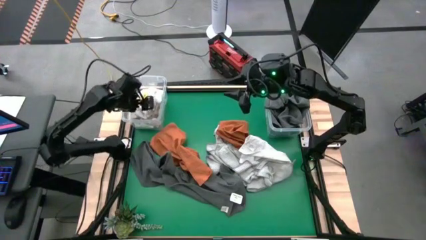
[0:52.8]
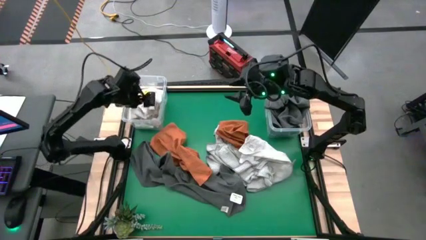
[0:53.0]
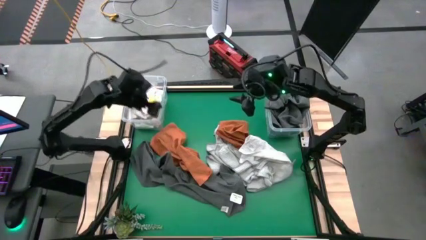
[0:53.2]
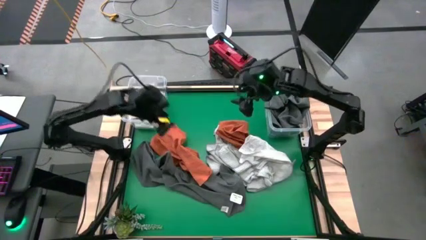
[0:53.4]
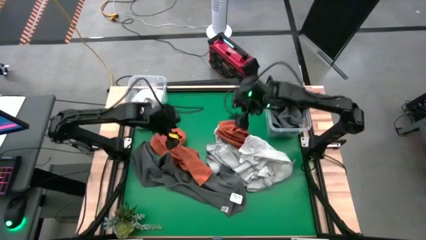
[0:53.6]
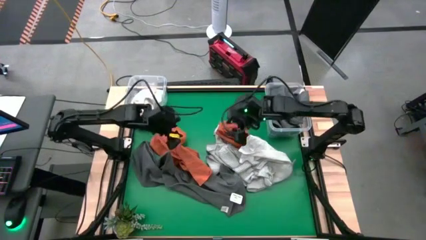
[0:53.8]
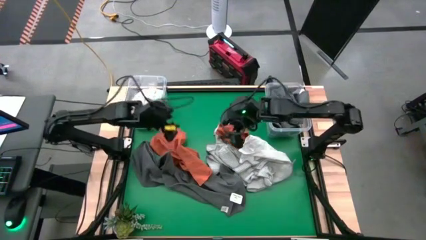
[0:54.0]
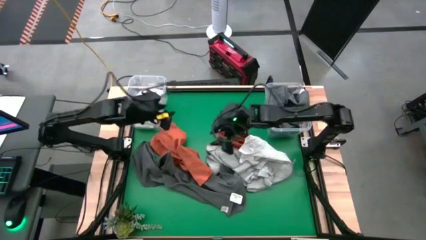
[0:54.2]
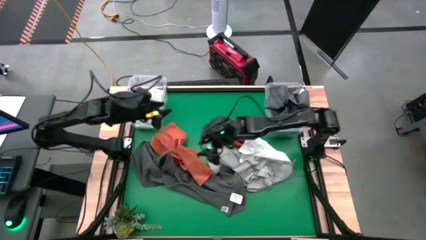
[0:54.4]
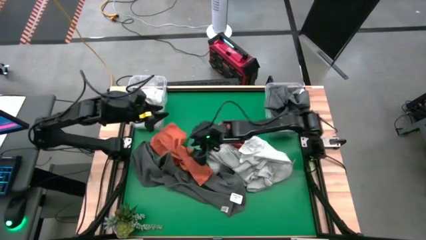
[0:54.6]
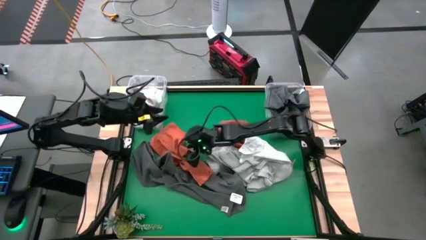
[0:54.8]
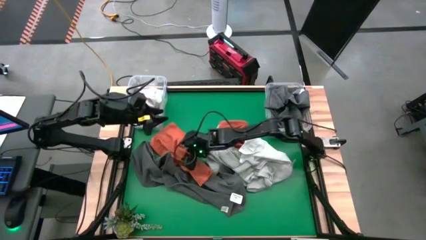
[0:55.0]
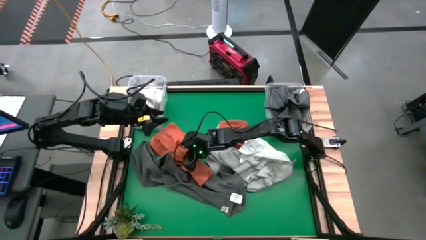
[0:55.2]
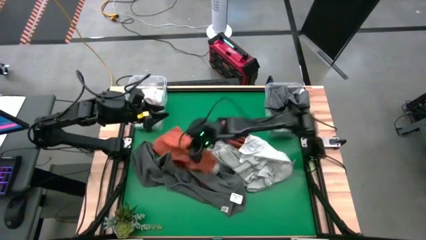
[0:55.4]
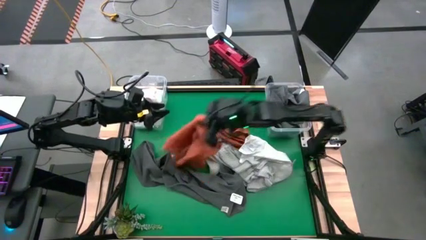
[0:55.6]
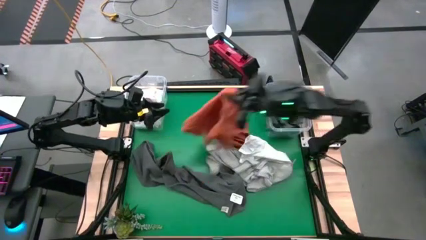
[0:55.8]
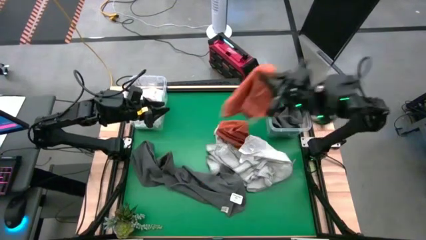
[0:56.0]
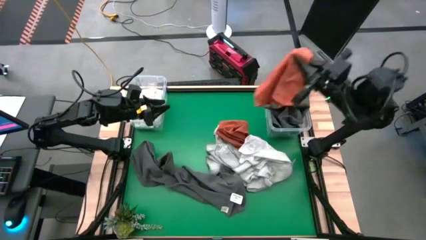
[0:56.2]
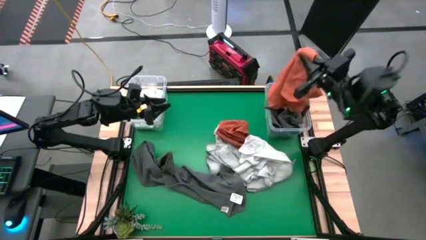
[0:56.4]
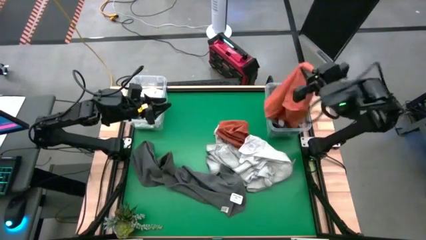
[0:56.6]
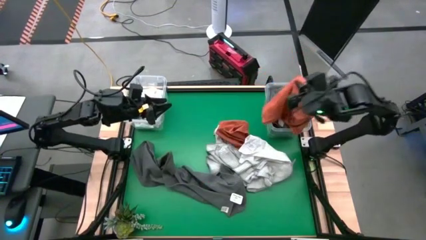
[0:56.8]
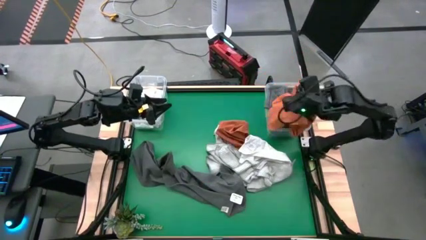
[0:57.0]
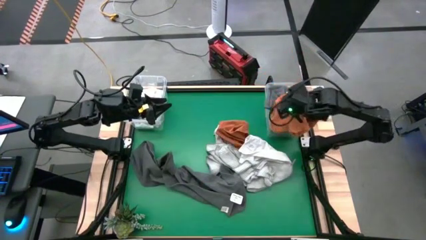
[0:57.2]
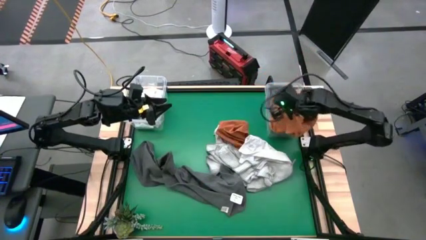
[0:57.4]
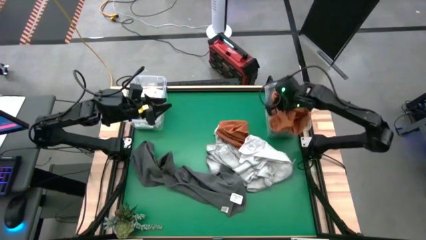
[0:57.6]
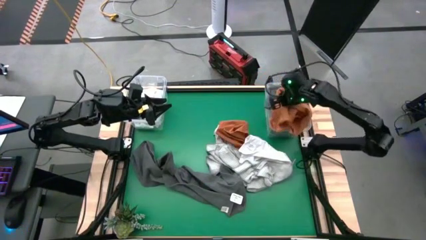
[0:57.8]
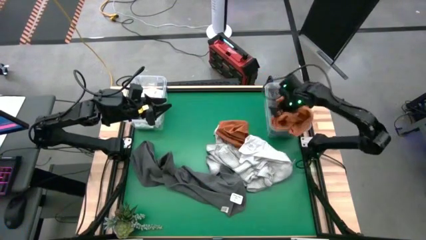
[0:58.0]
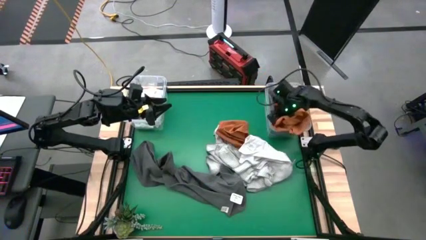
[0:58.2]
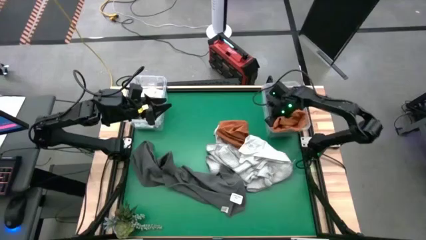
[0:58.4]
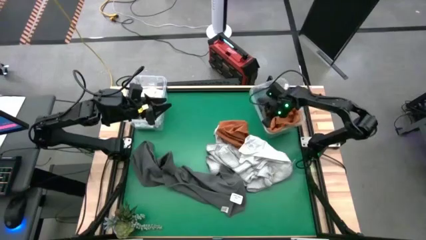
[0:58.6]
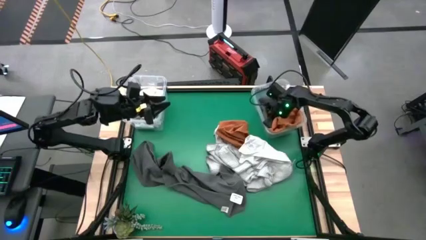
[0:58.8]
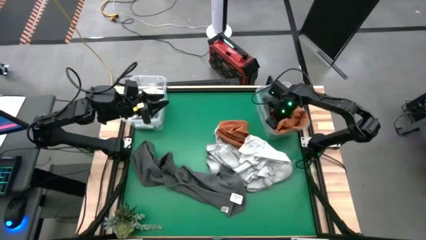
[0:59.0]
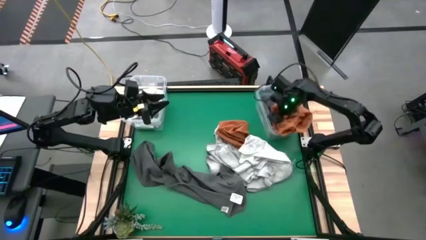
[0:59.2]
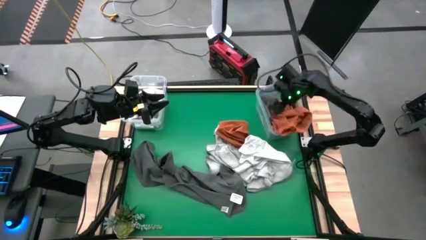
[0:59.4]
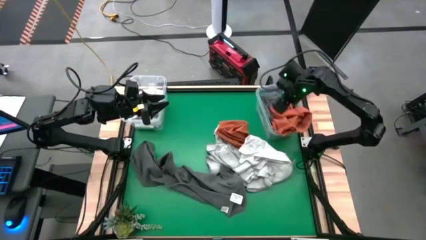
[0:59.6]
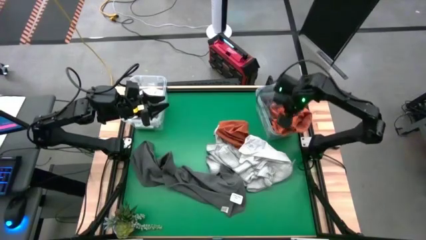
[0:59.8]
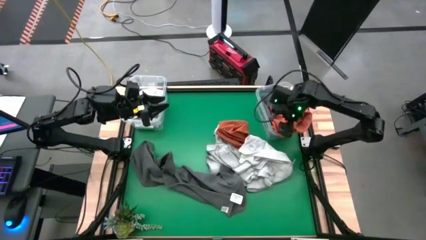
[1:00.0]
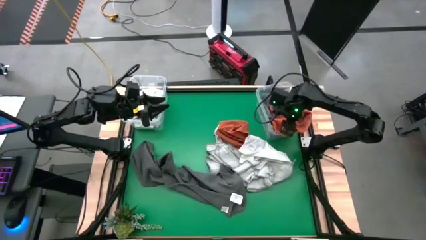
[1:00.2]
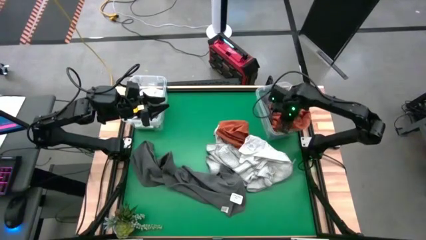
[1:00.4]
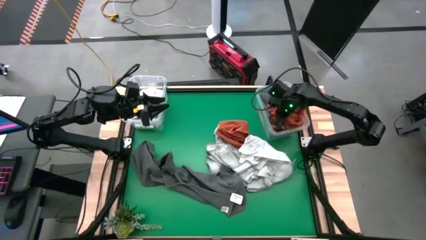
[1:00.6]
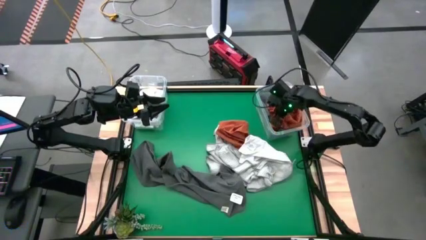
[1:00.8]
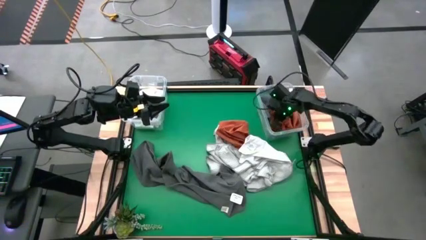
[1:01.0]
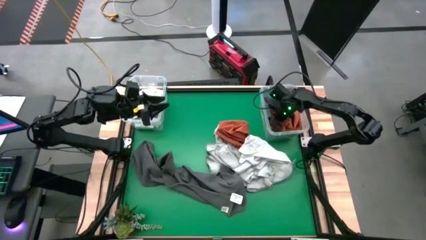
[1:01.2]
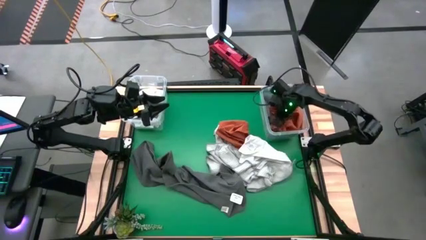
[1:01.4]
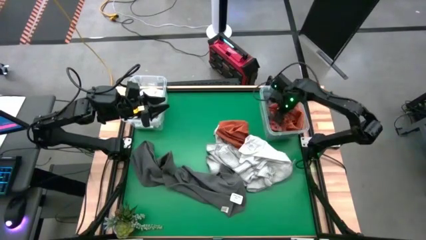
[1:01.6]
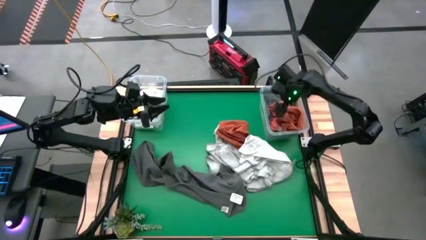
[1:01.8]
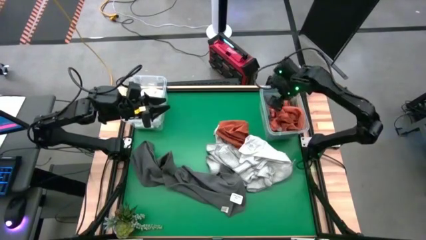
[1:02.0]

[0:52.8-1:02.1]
Task: Sort towels by color in basket
Put the orange towel into the right transparent bin

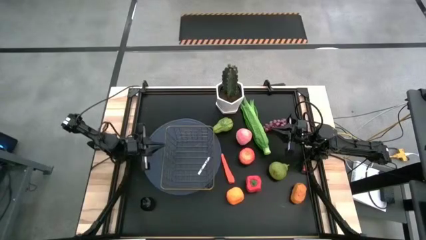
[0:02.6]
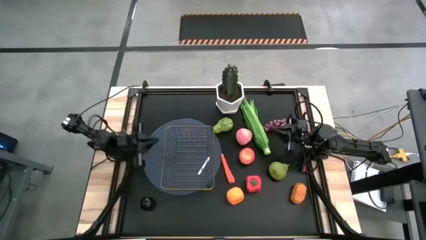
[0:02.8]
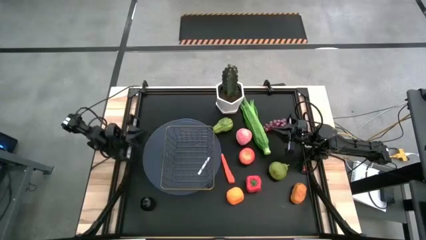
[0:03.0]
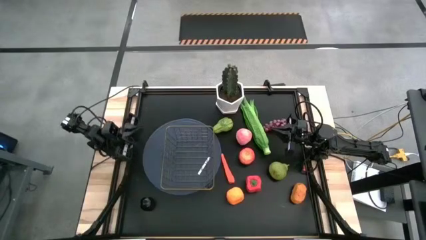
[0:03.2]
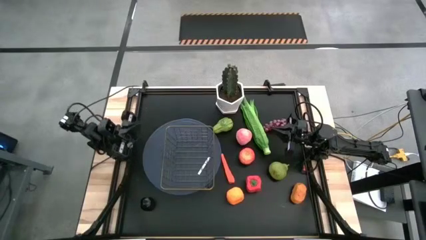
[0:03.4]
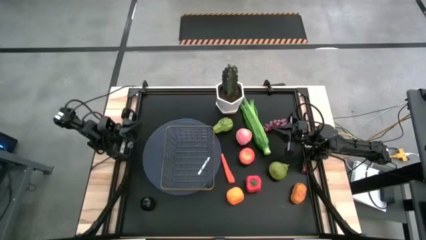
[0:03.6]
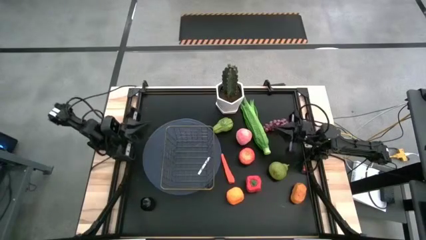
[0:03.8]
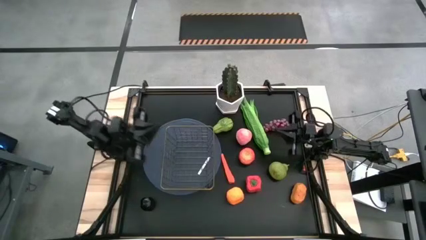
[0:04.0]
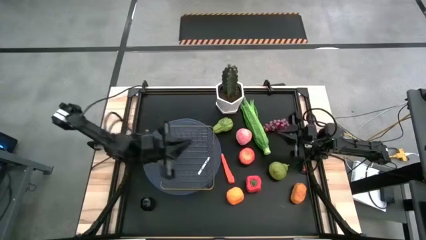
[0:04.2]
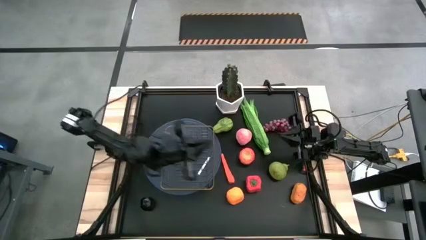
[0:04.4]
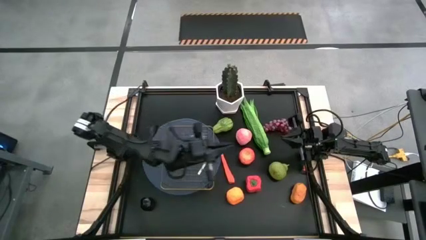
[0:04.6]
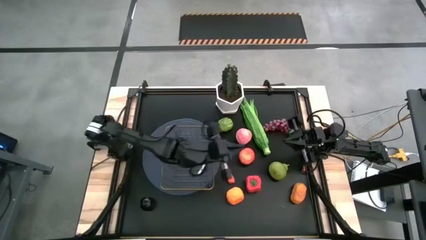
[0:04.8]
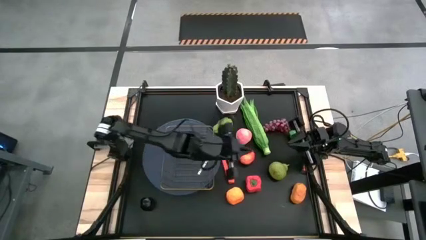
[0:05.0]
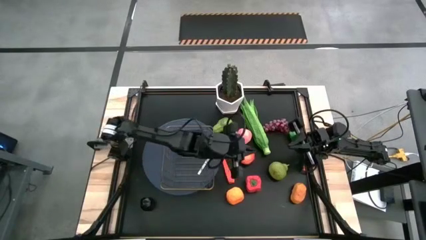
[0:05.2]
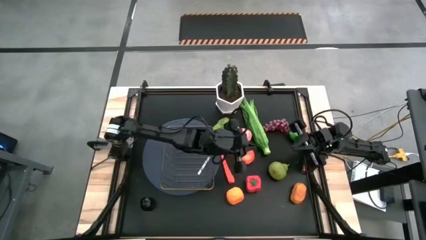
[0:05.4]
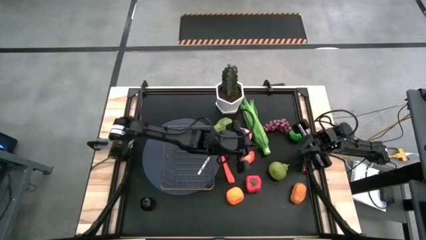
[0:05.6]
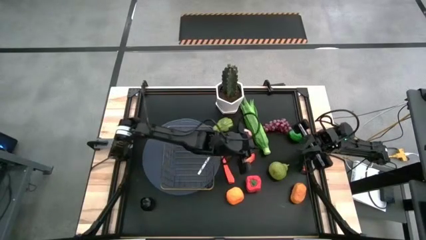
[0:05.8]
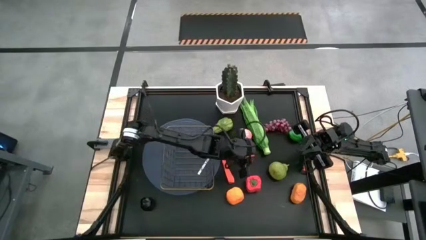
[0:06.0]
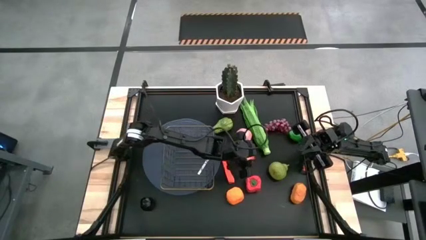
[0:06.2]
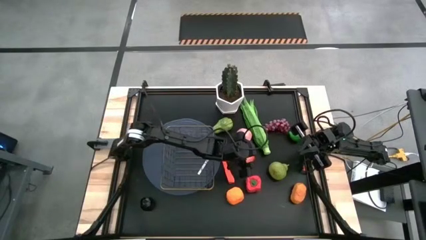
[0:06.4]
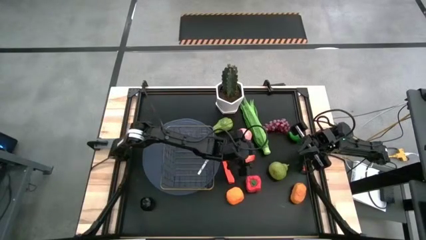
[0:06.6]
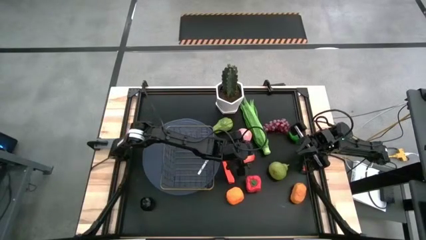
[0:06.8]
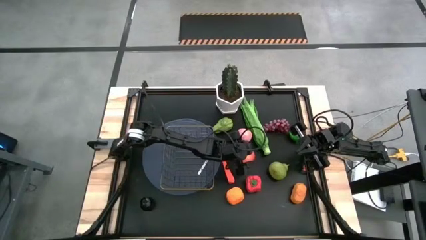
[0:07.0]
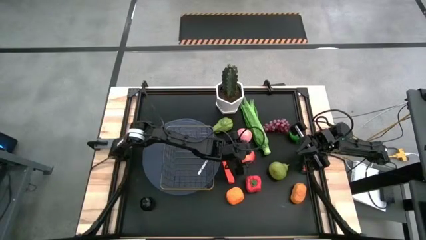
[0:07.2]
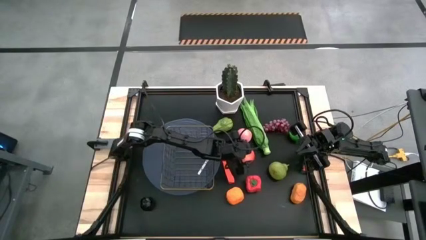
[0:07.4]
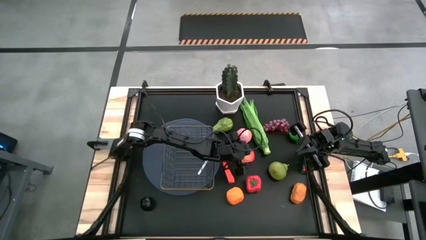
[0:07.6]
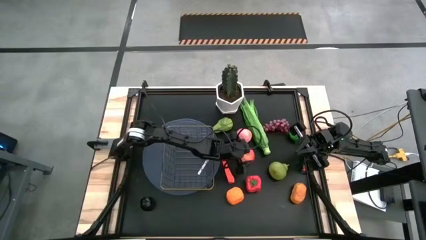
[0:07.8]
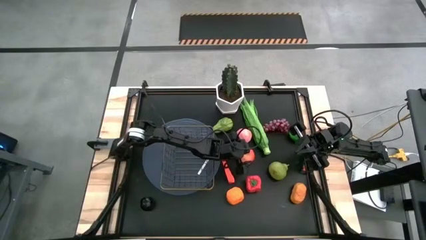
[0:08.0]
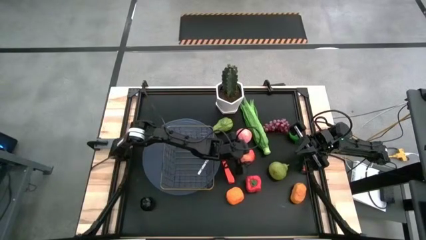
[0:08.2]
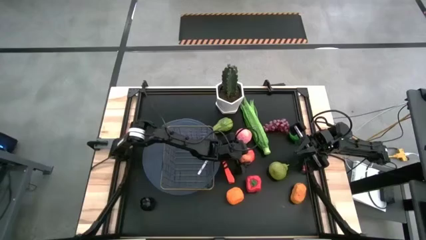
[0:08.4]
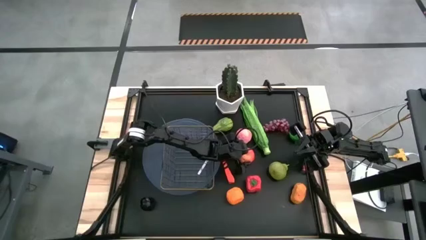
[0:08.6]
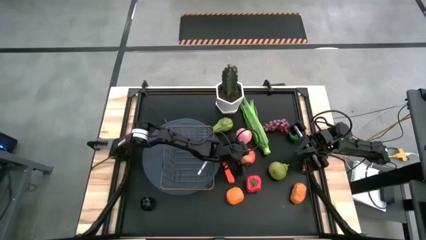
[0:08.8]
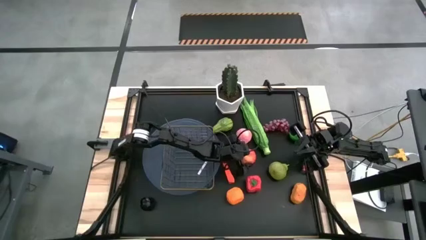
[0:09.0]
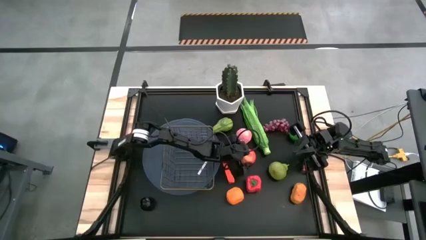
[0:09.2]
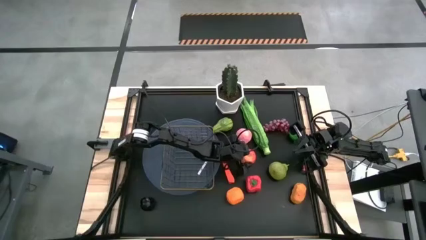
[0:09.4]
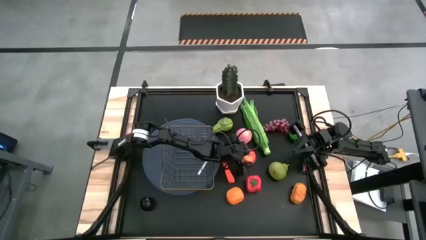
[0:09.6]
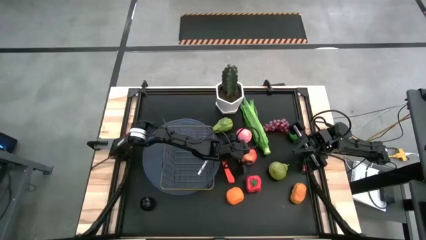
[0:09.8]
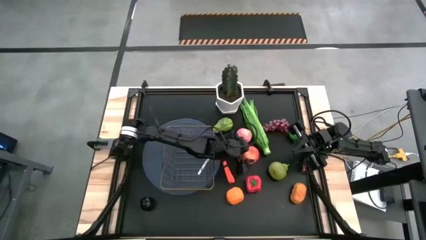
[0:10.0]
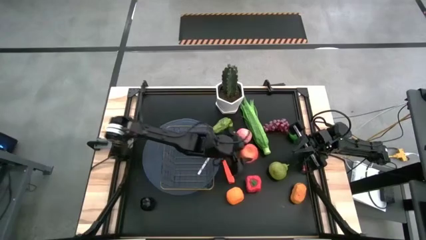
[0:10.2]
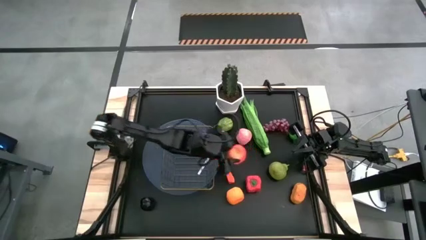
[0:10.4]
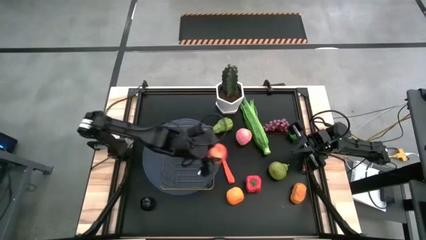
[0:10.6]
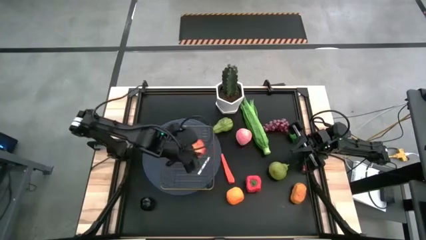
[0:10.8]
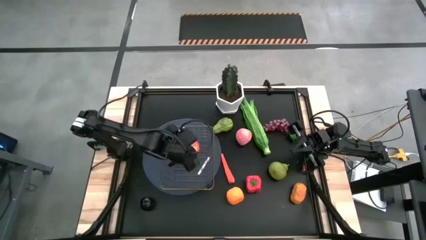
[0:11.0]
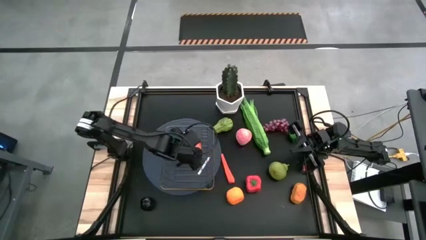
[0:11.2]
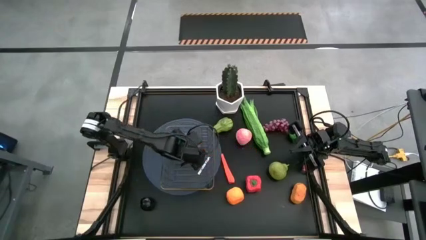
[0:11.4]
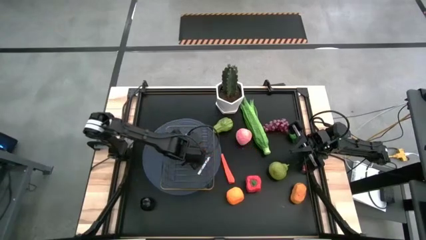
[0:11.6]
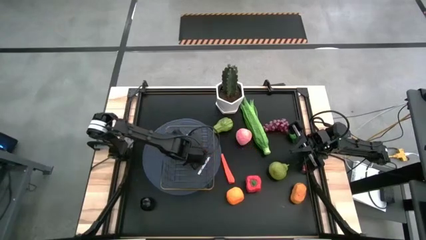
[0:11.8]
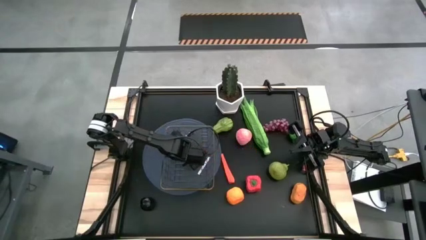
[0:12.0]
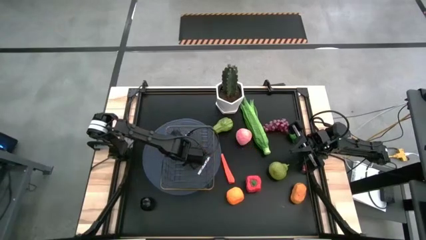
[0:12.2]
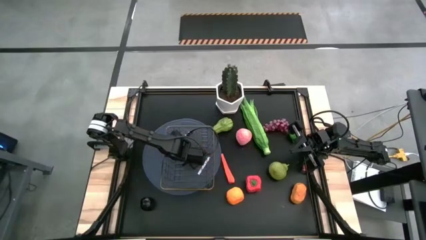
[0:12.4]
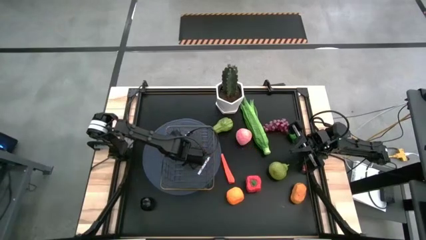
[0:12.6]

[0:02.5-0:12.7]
Task: Build produce basket
Put the red apple into the wire basket
